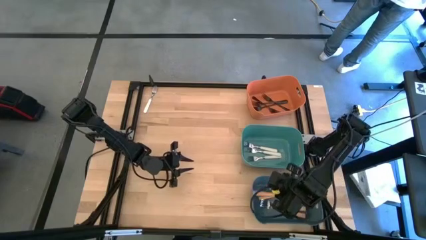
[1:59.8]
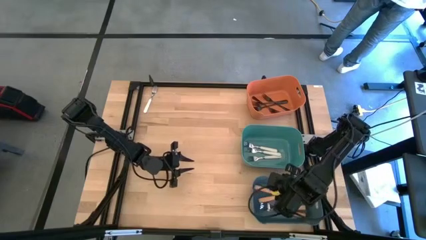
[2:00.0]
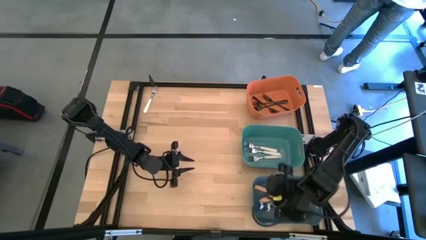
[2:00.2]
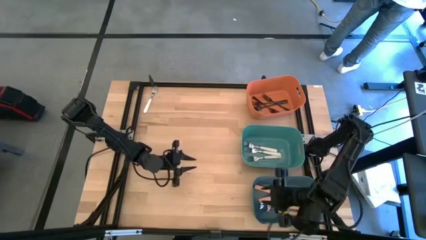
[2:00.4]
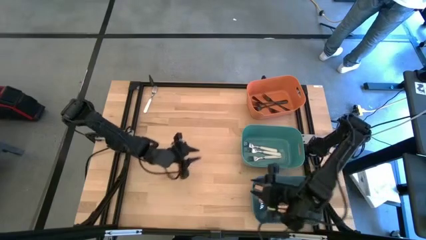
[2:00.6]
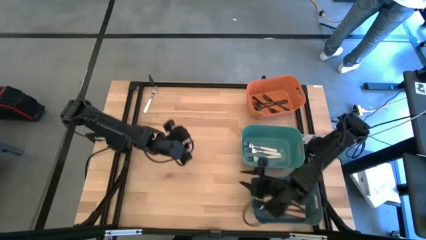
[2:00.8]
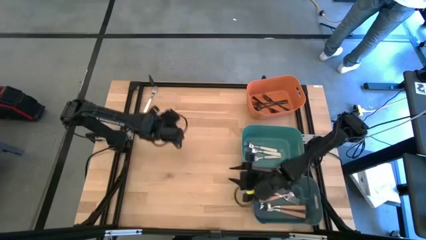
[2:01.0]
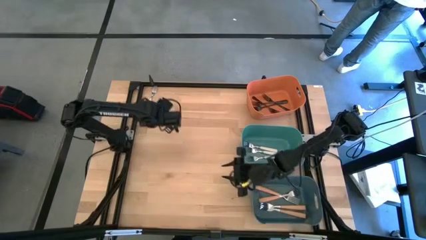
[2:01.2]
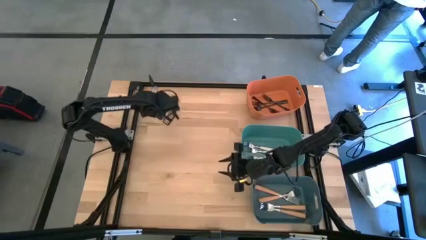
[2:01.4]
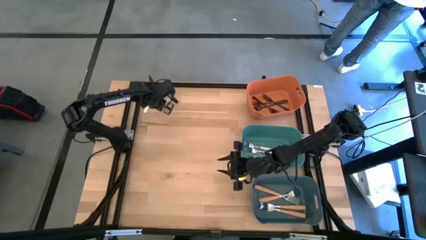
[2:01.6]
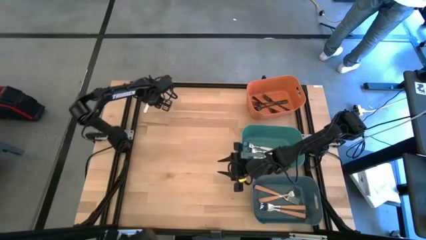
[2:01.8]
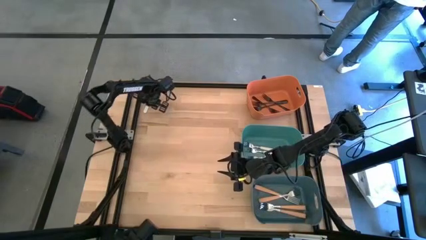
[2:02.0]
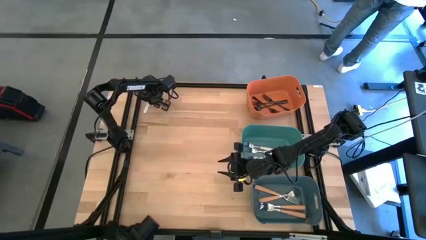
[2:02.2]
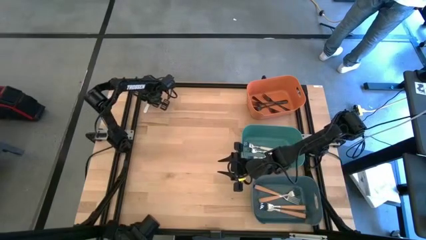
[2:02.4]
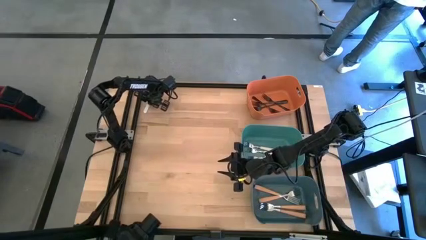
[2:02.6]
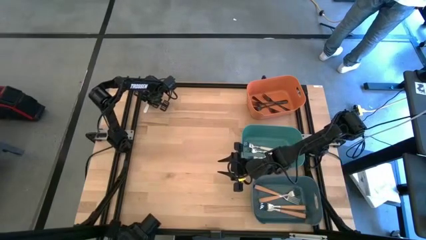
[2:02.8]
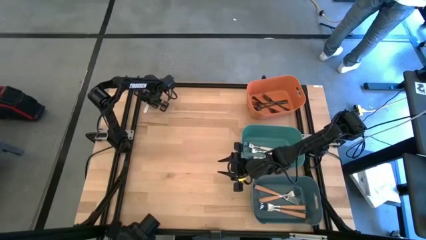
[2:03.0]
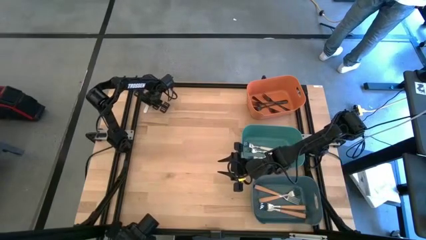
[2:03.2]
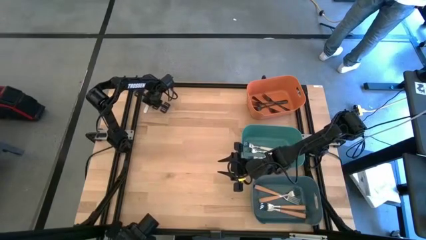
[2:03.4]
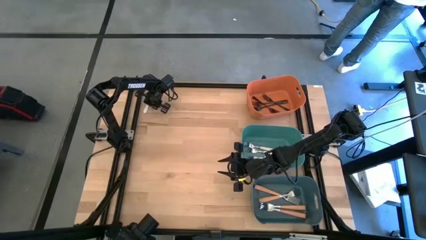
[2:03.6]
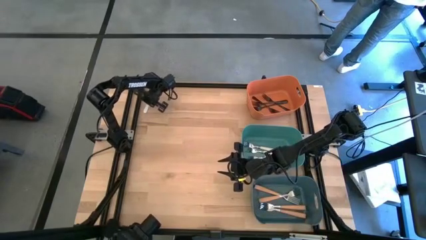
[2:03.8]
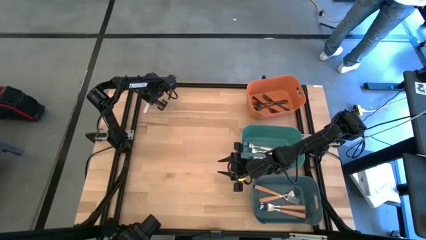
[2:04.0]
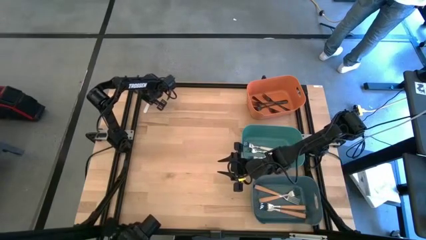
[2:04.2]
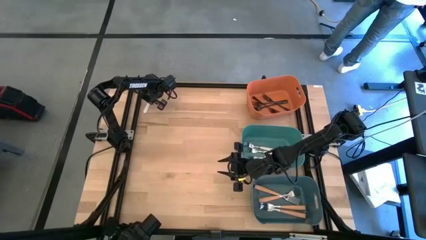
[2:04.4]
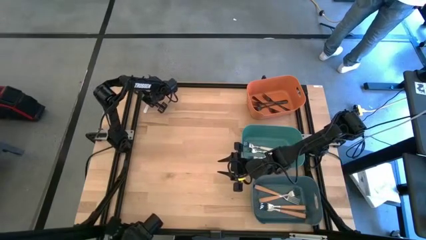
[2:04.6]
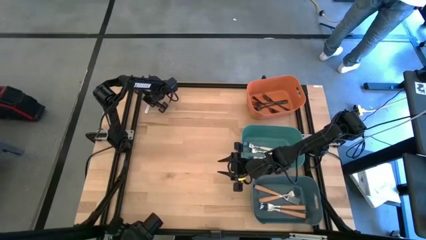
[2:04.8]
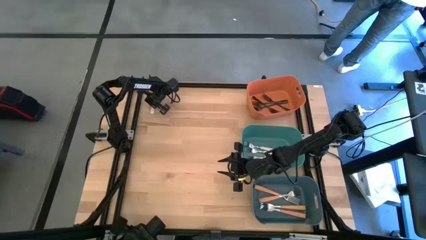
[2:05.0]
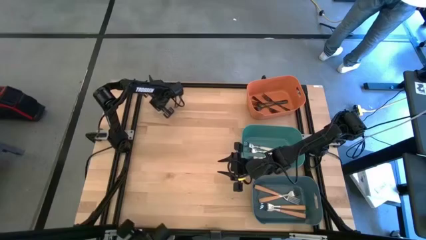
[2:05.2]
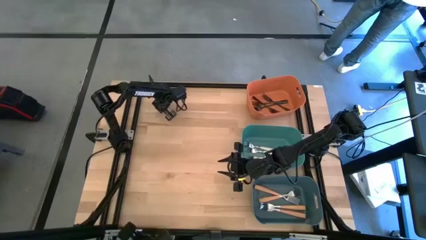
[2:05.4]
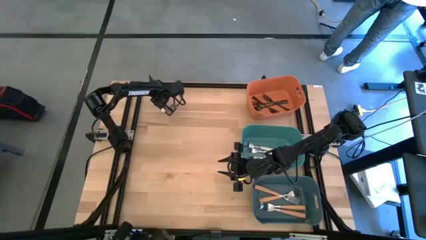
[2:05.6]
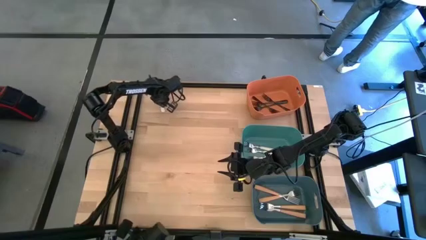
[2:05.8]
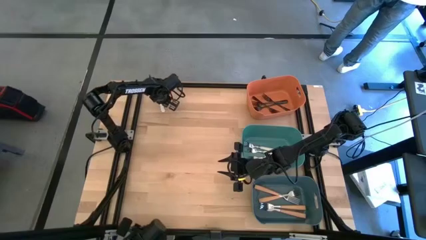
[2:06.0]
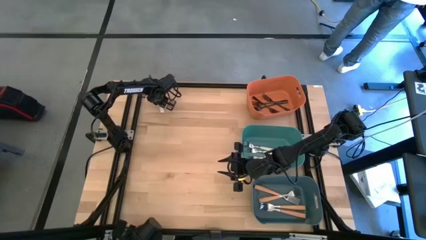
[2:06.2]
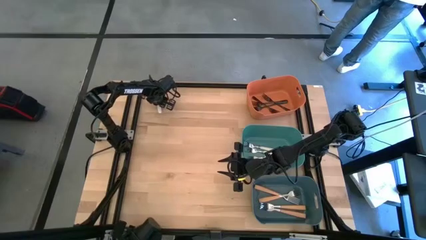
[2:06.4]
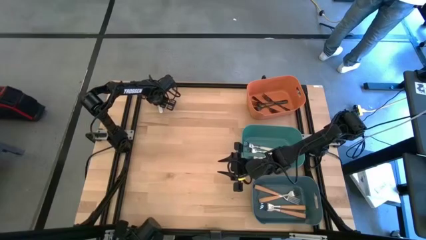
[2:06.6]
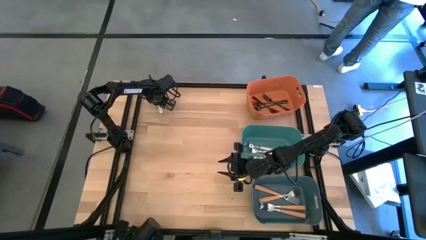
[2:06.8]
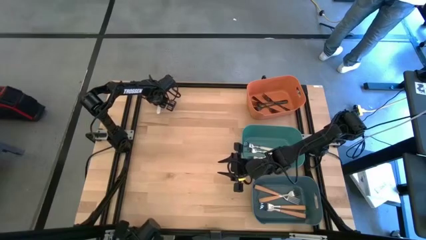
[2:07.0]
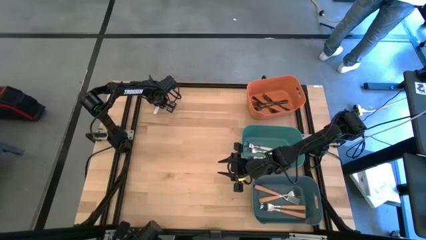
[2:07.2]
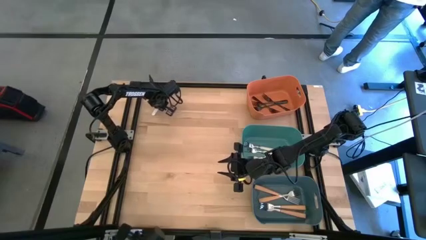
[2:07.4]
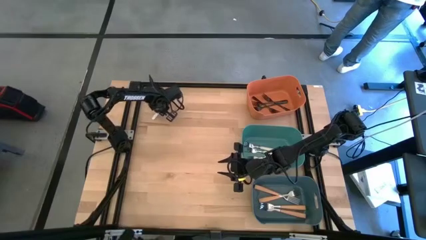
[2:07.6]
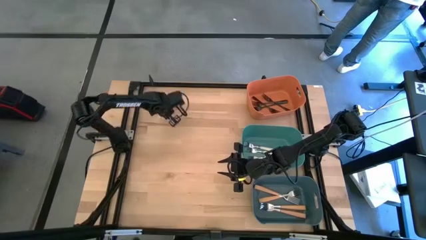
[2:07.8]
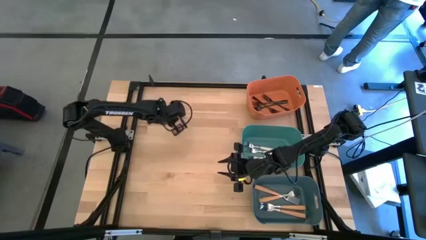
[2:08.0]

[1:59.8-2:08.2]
Task: Sort silverware by color (type)
Put the white fork into the green bin

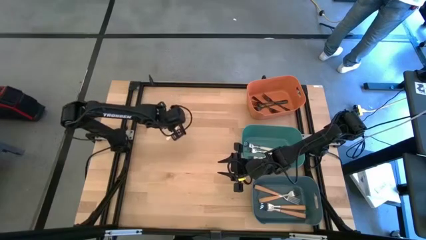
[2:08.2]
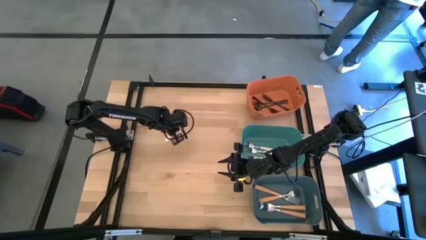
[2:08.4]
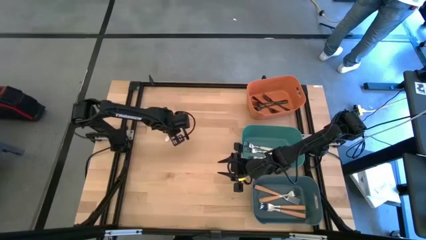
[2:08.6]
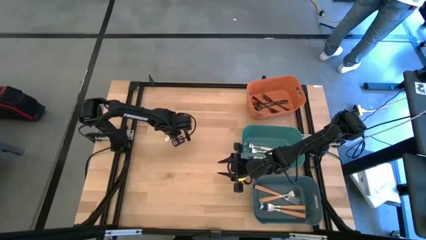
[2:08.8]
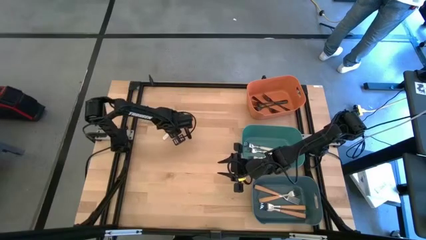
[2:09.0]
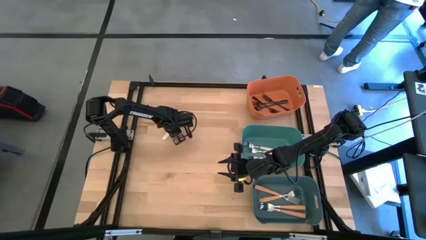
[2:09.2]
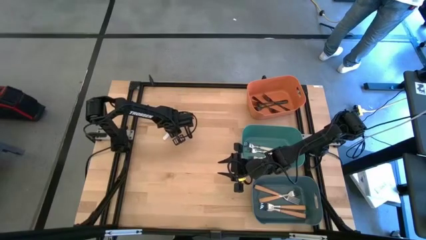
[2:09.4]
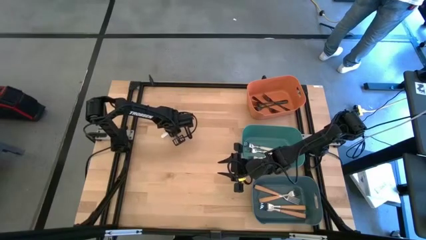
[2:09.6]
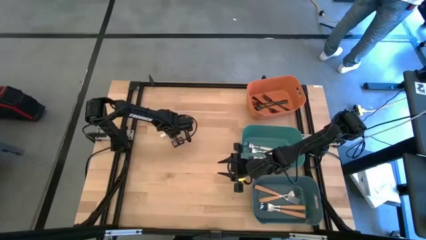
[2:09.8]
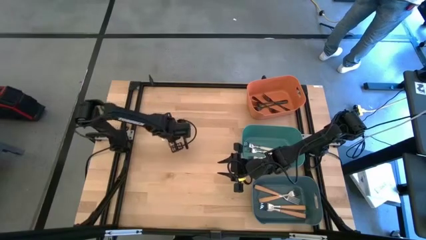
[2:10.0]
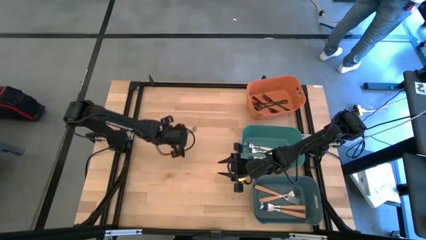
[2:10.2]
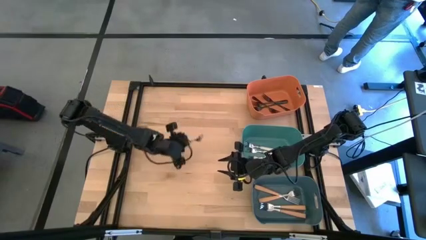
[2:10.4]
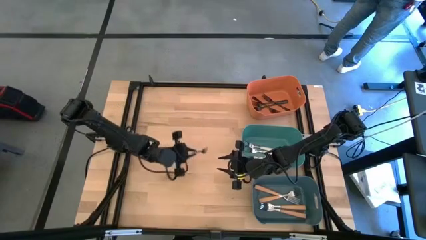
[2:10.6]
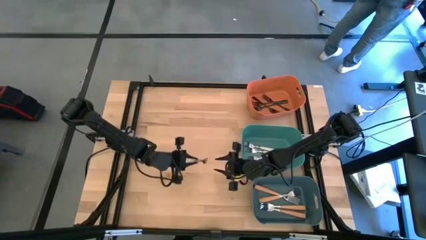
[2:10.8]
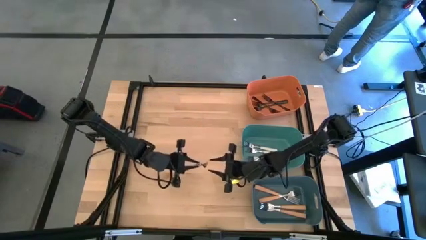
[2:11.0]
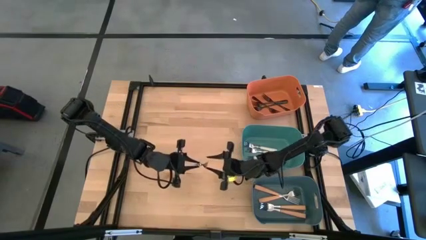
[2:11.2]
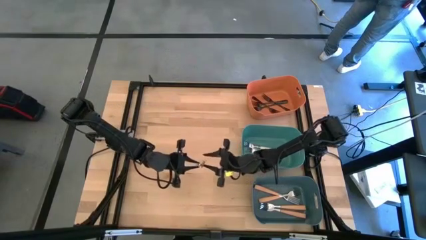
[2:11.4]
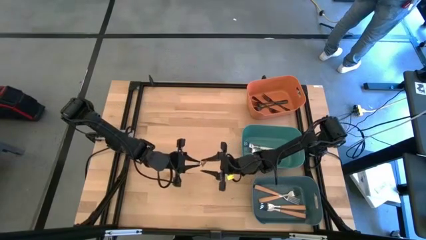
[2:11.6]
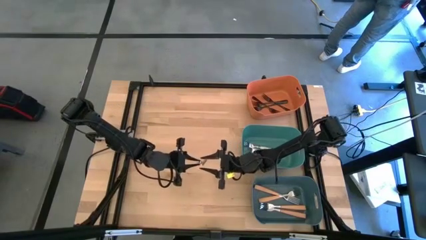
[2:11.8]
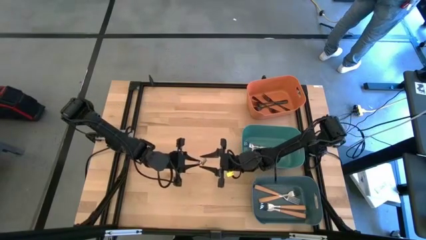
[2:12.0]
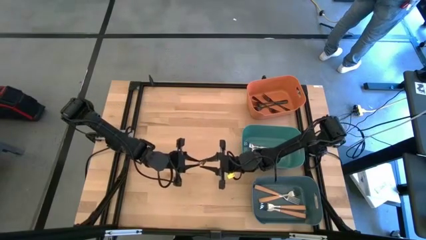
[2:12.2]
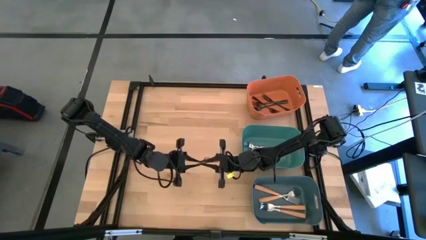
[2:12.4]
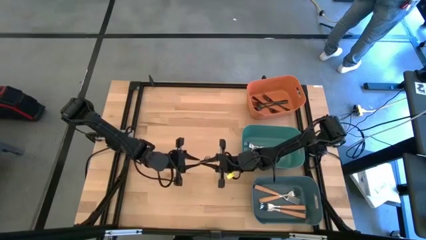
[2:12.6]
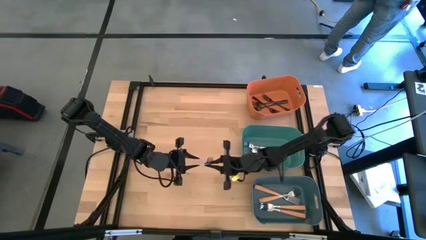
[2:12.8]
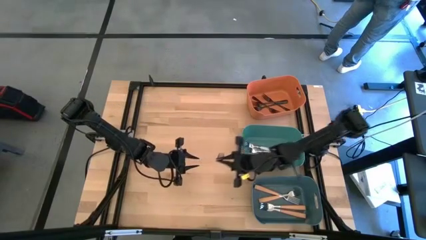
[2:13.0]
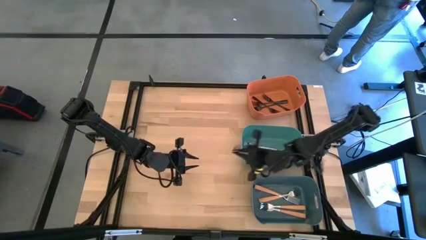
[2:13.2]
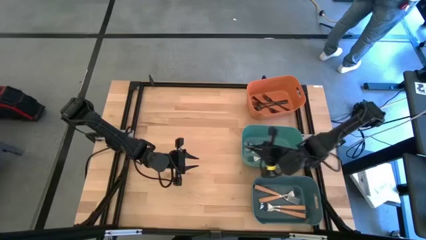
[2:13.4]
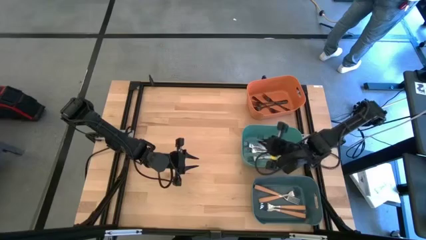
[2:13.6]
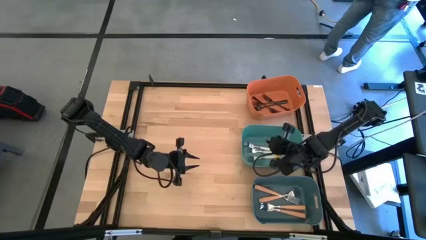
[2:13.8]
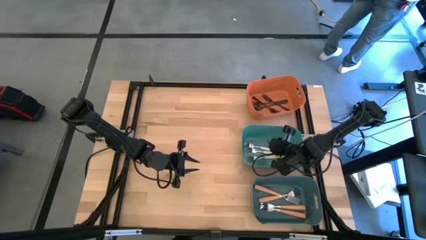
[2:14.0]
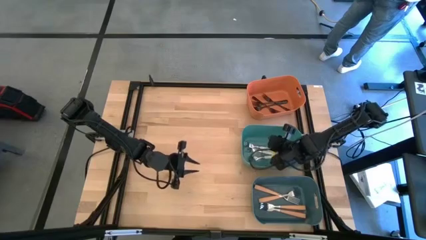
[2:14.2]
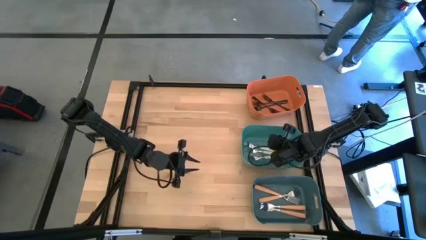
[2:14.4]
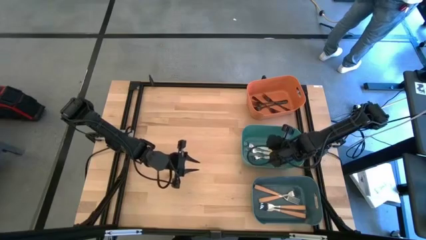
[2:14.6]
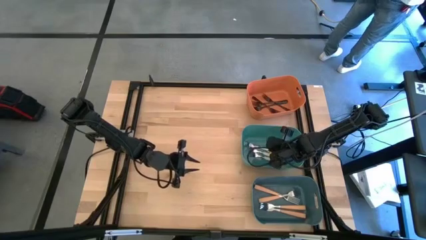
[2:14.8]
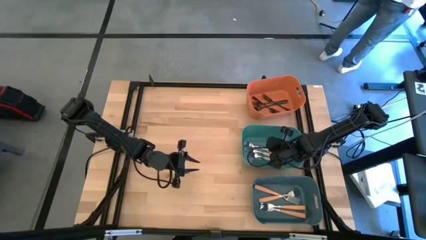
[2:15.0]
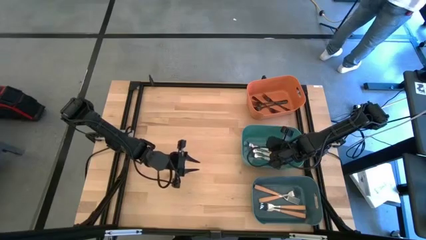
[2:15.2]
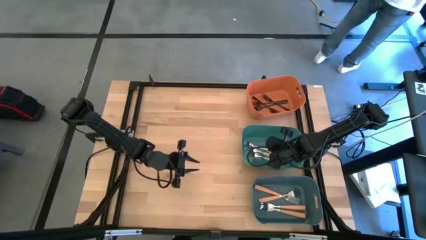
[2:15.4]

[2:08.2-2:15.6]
Put the white fork into the green bin
